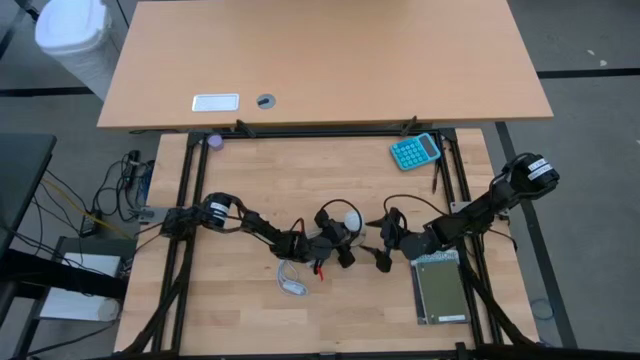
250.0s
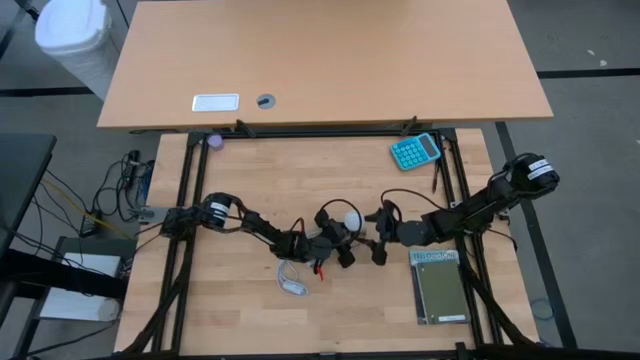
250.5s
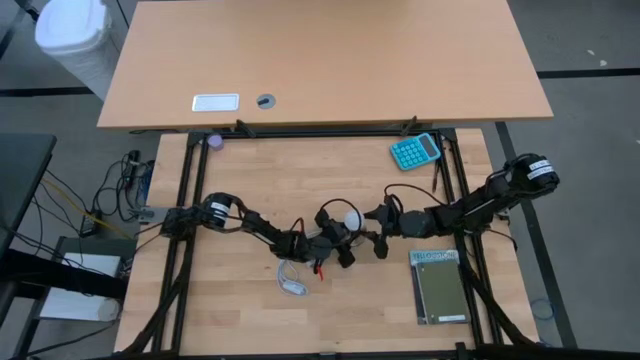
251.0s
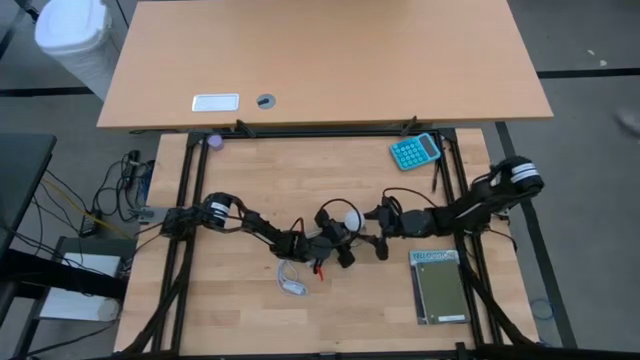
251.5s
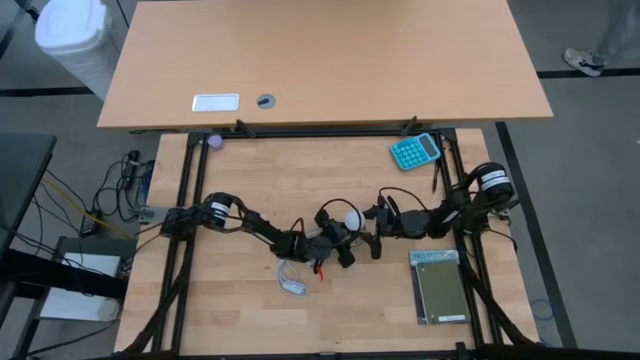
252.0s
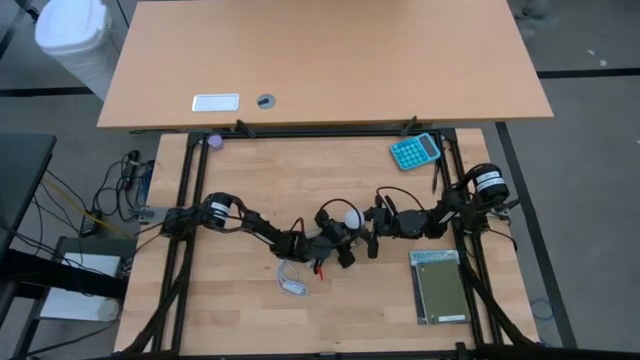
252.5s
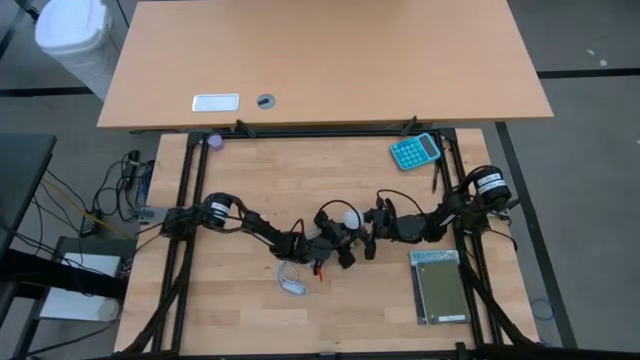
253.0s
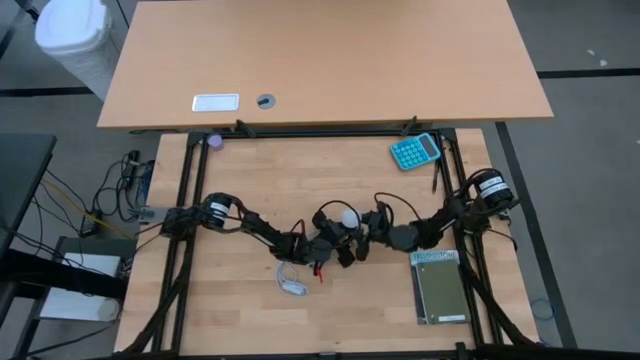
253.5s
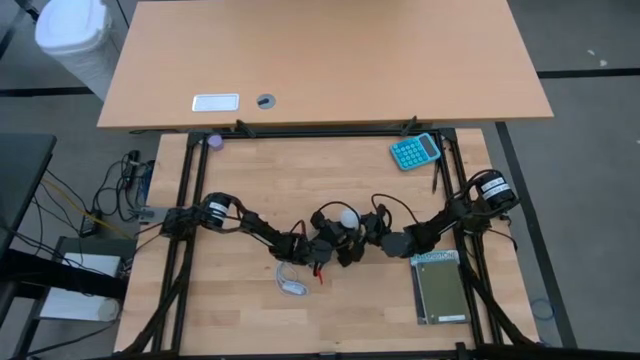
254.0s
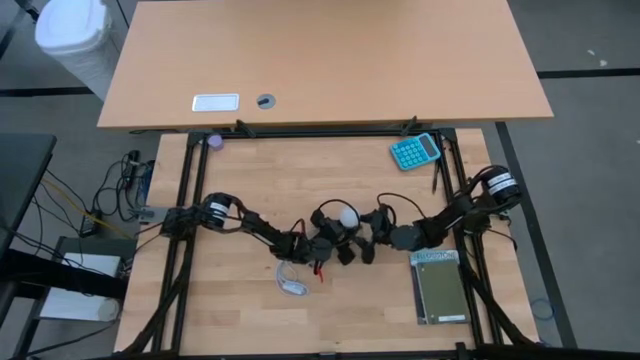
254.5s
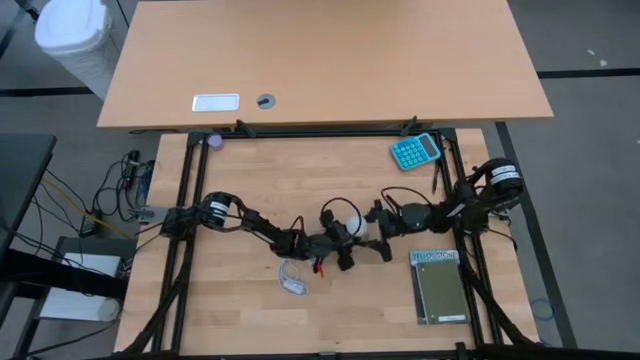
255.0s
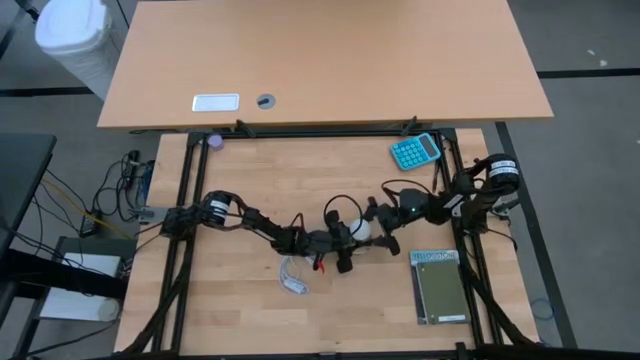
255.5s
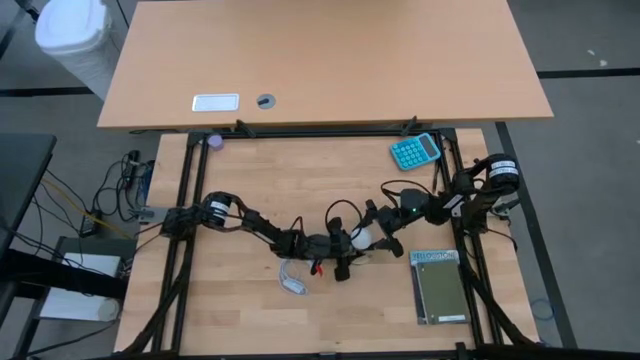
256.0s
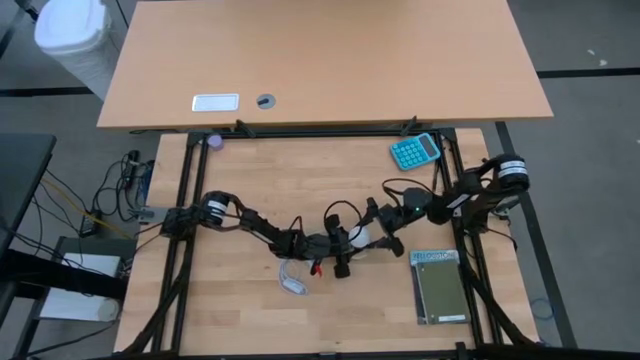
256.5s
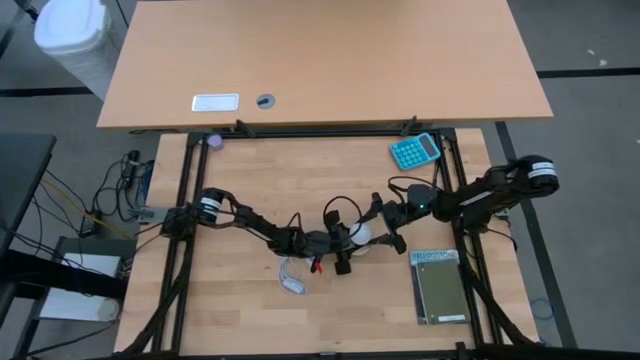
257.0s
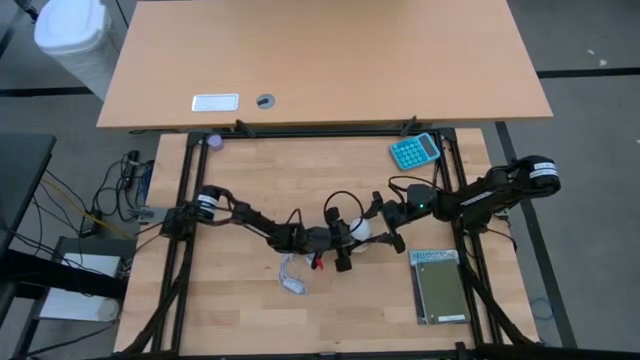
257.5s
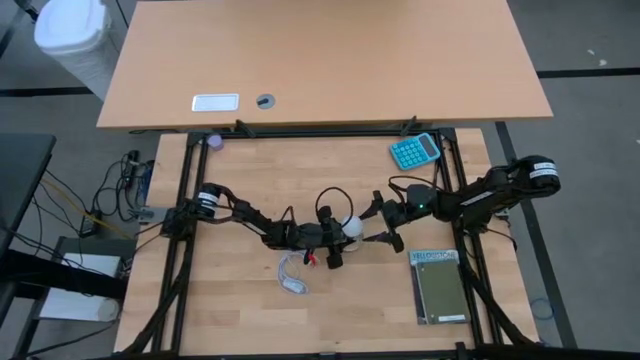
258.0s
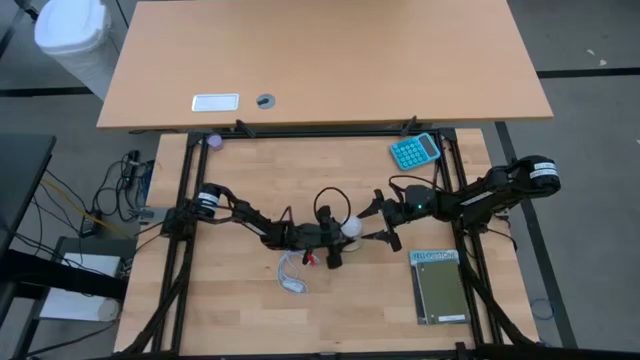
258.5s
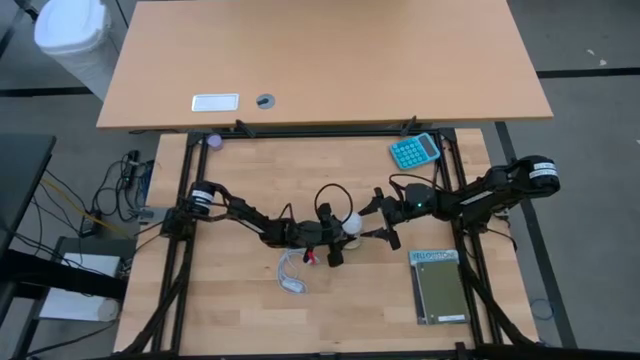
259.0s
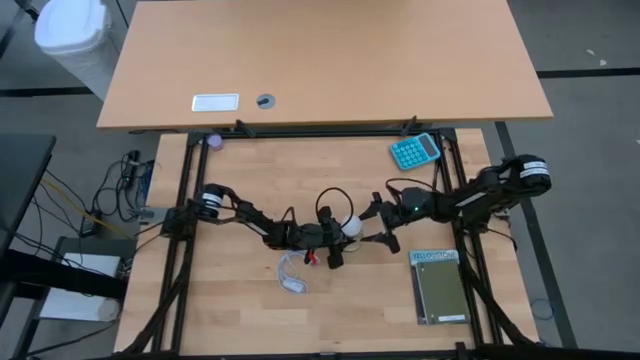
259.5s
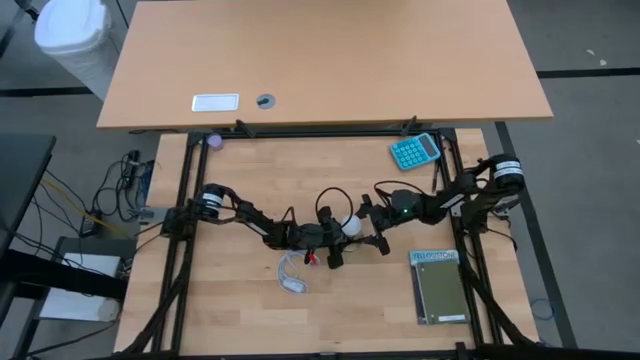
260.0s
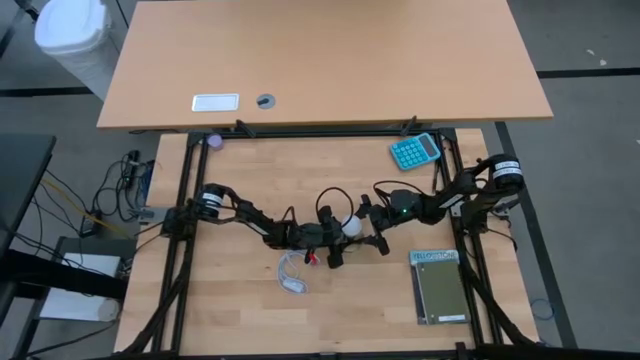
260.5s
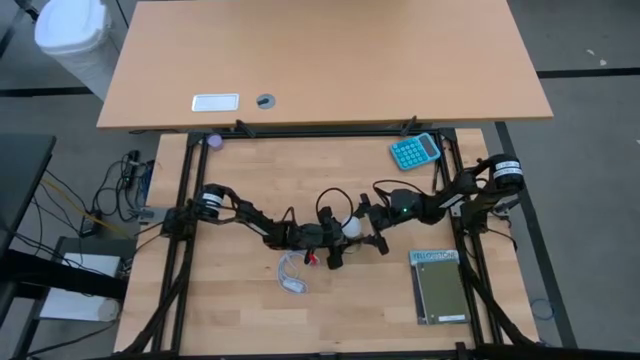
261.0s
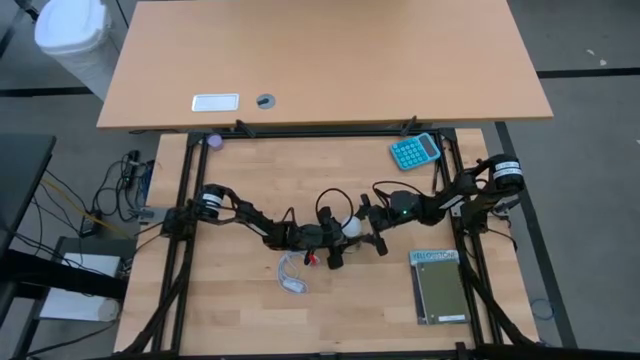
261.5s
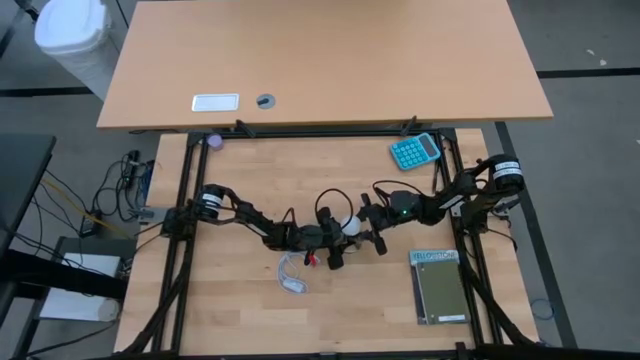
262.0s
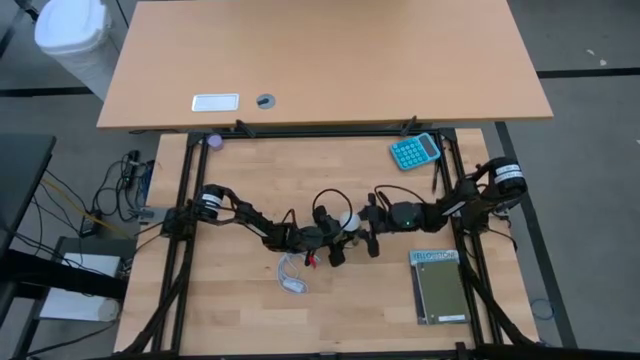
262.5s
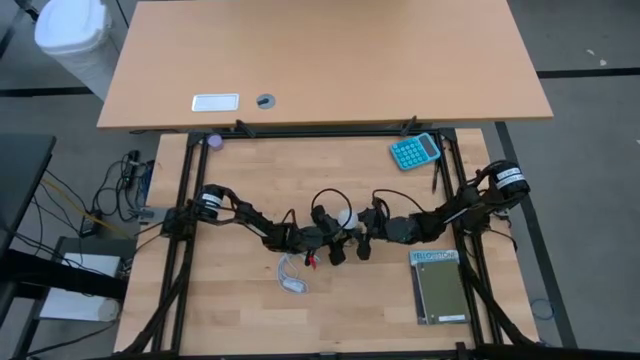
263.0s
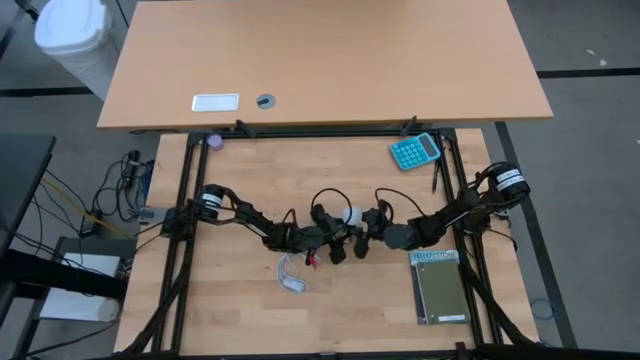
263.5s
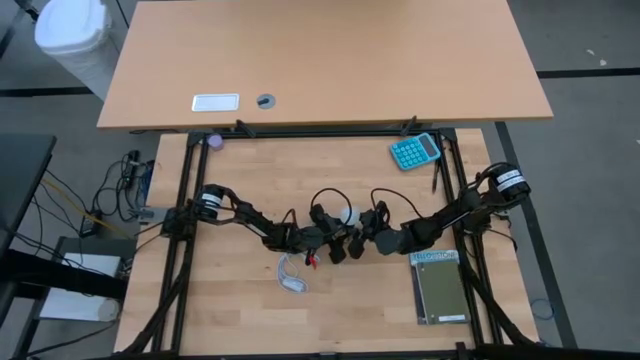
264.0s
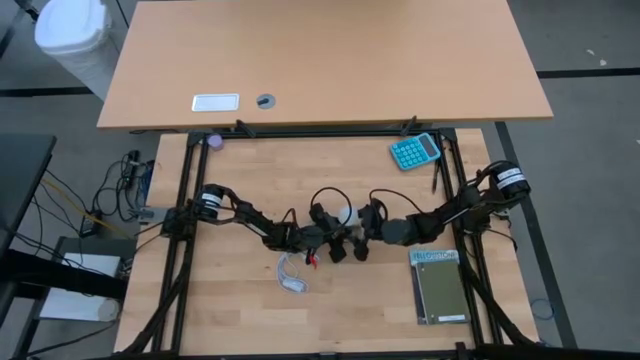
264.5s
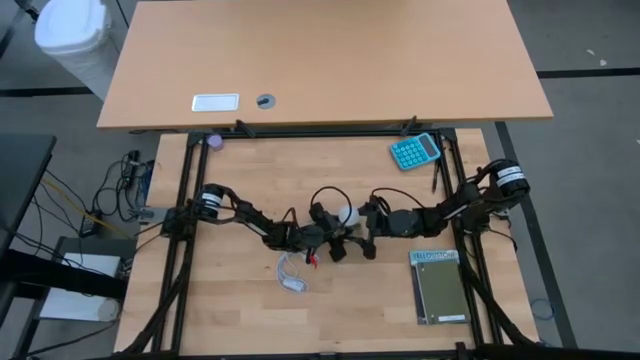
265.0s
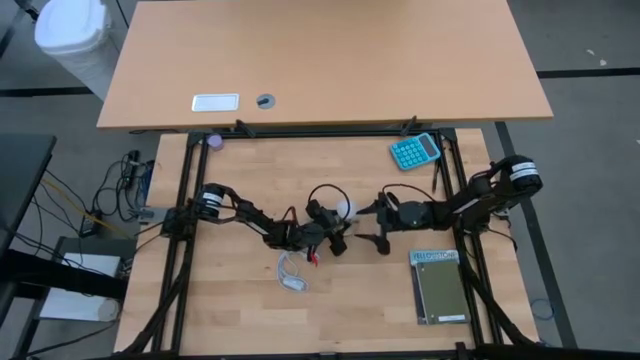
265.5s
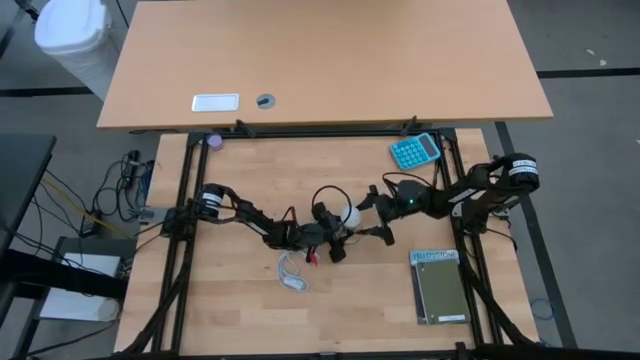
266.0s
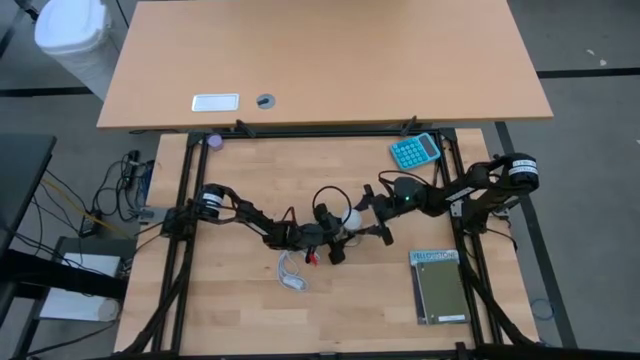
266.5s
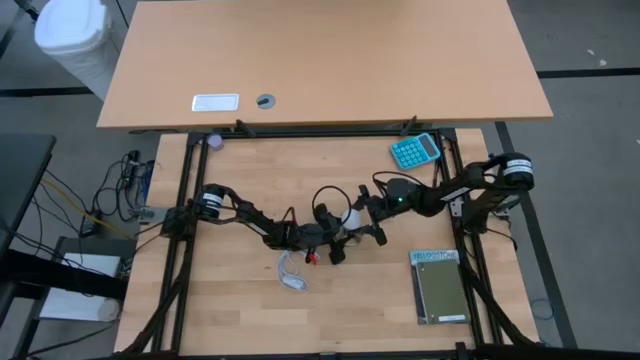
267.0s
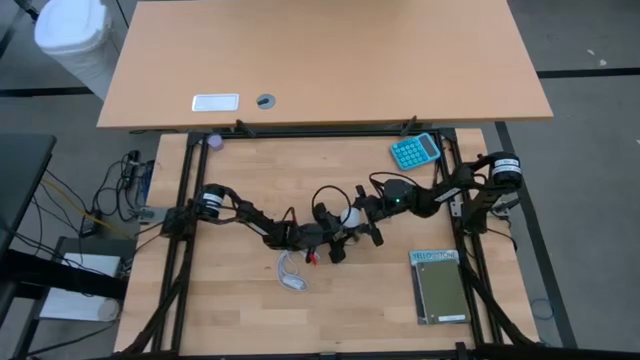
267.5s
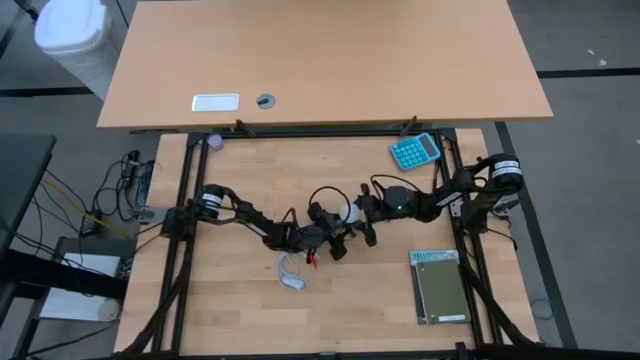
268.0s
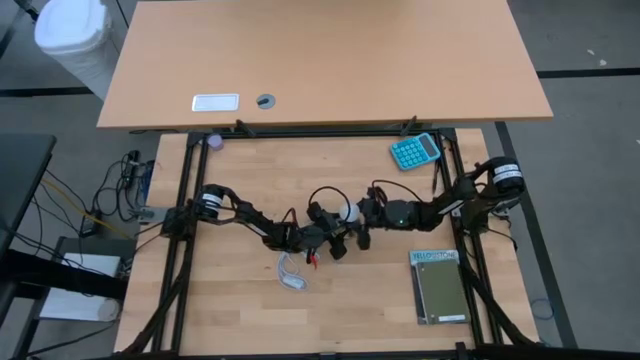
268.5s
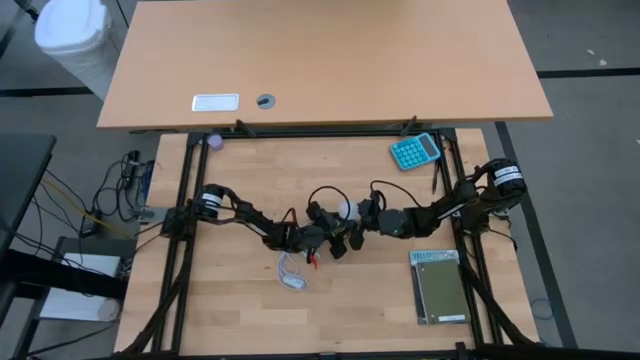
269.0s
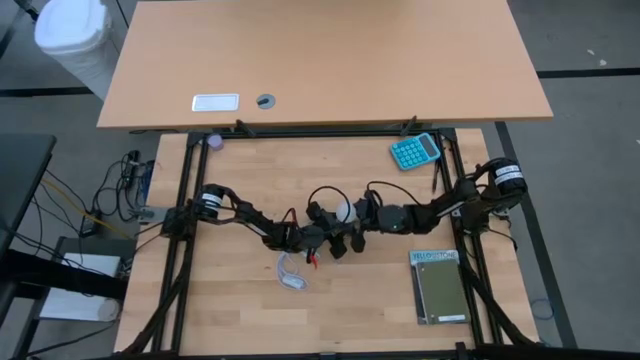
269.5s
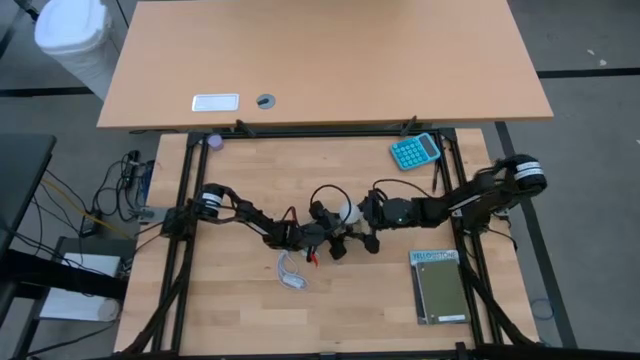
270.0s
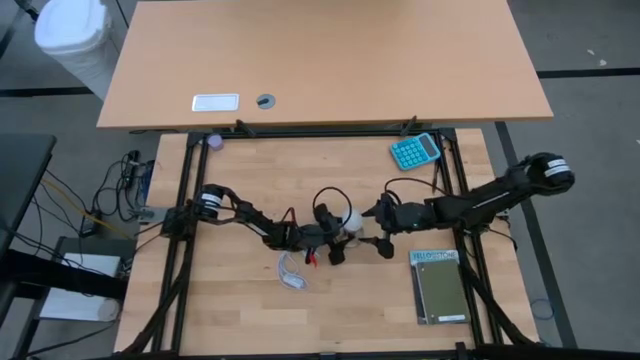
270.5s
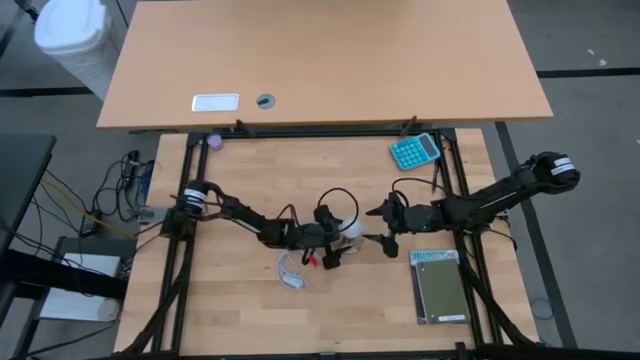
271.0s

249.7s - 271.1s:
Task: Screw lightbulb
Insert the lightbulb into the socket
